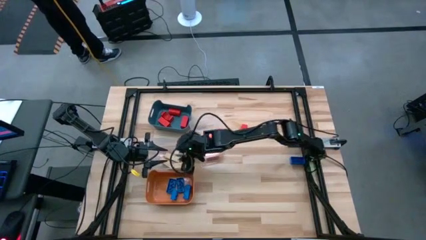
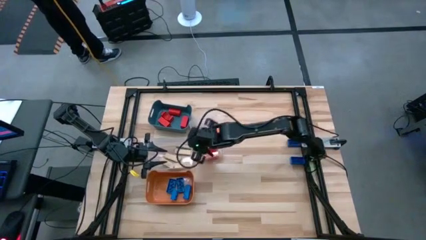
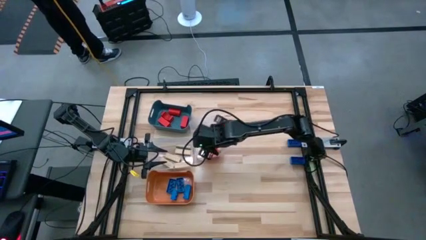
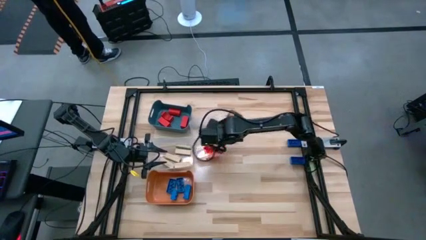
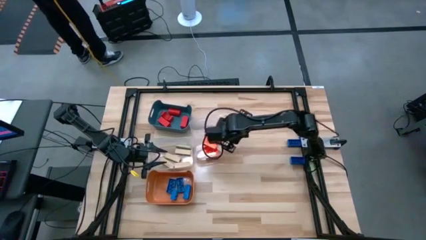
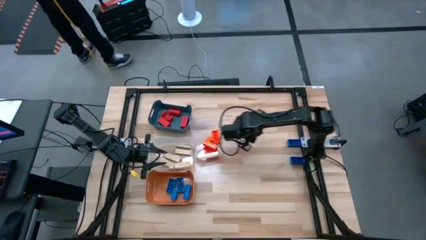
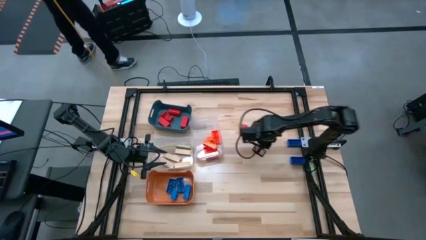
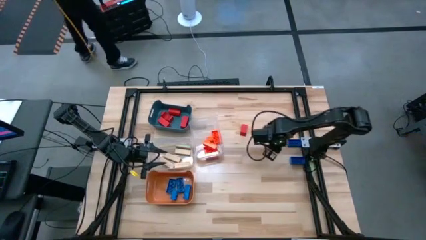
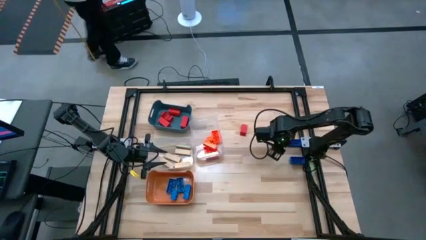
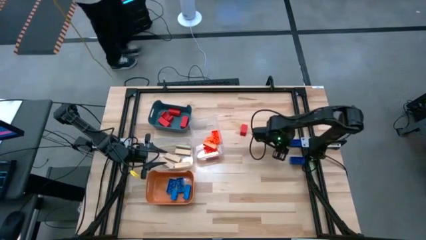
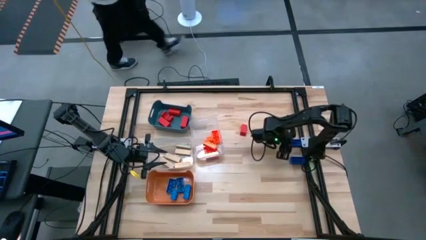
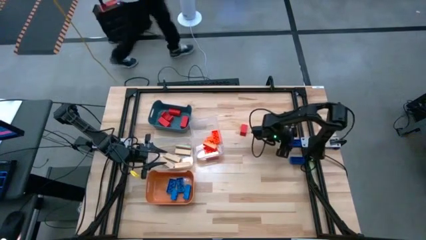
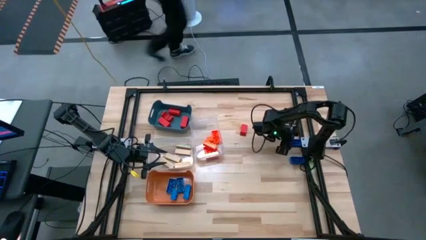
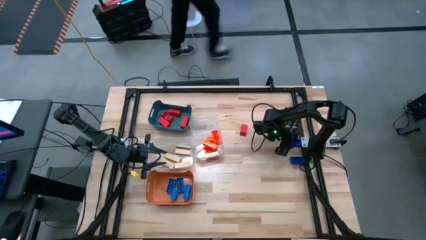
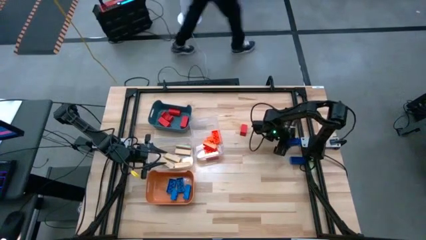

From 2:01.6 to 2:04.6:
Task: Sort blocks
Put the blue game piece into the orange bin

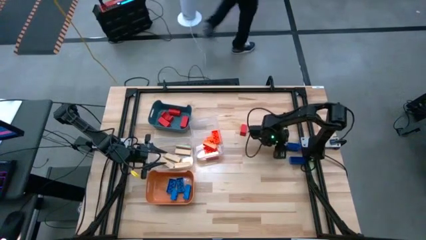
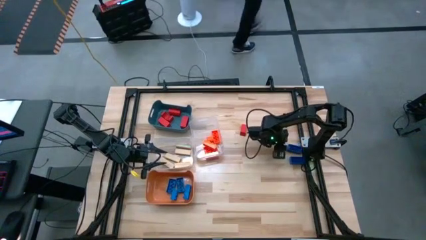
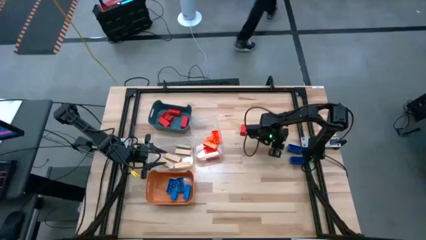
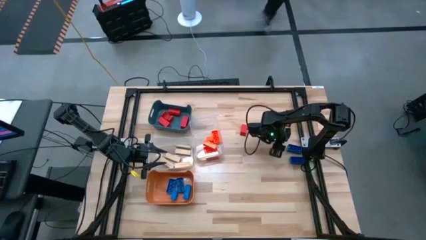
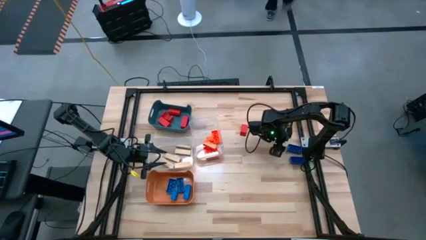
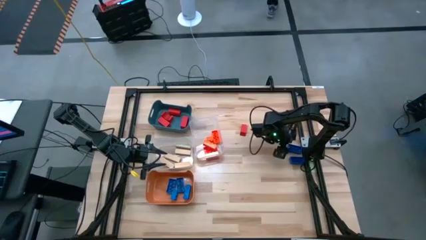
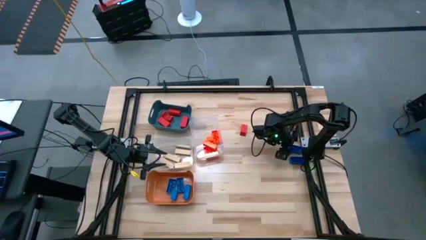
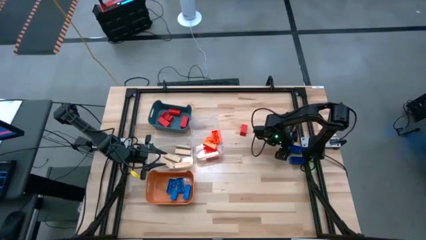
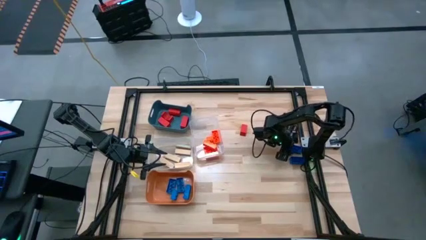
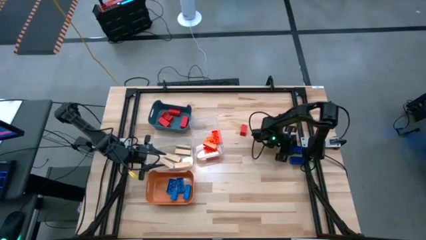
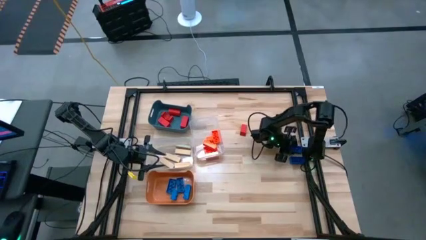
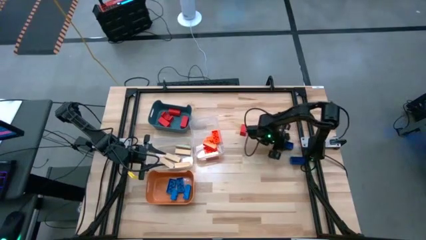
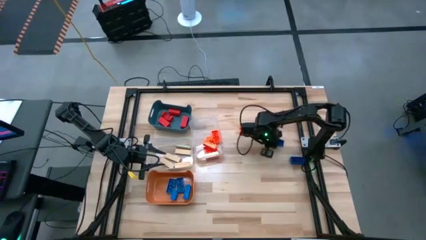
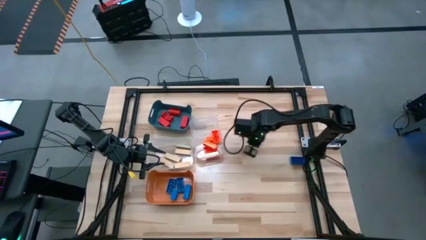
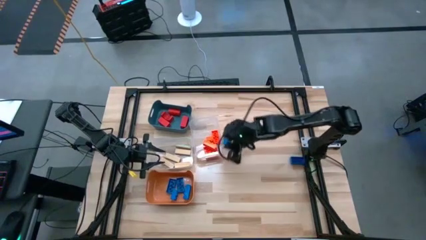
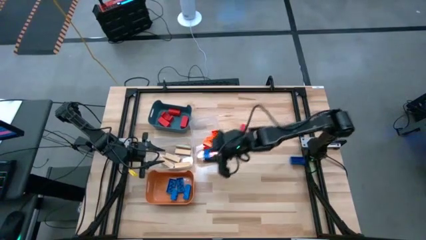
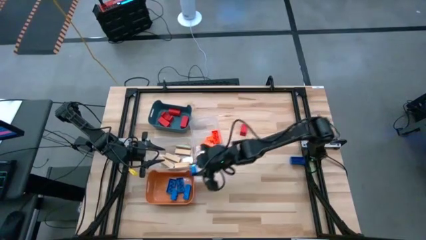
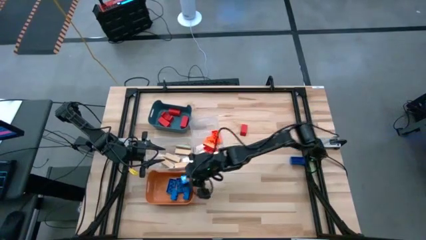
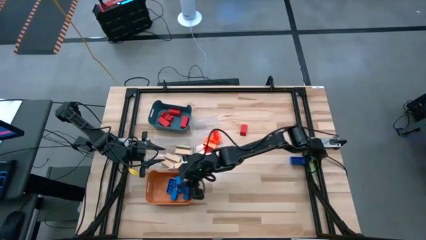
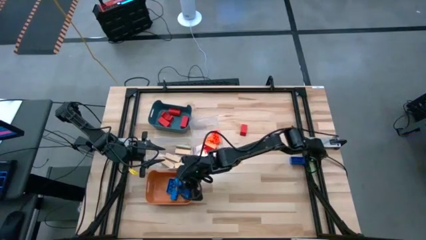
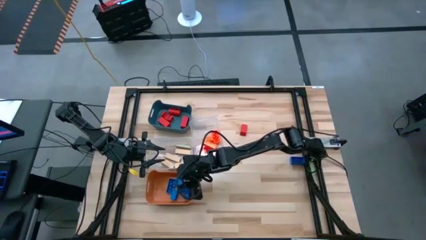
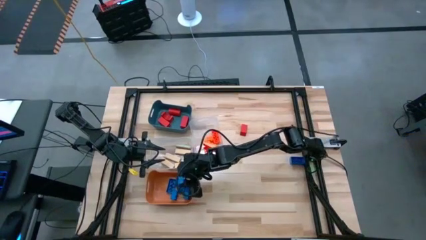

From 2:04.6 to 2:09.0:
Put the blue game piece into the orange bin

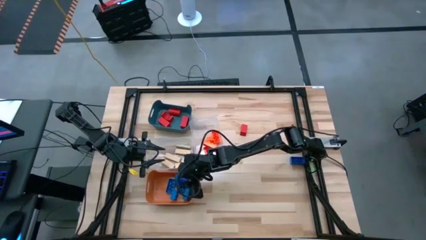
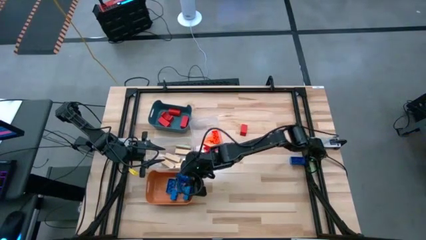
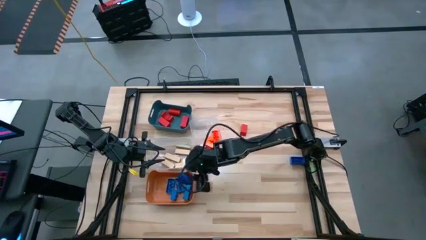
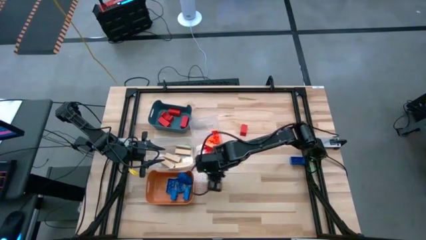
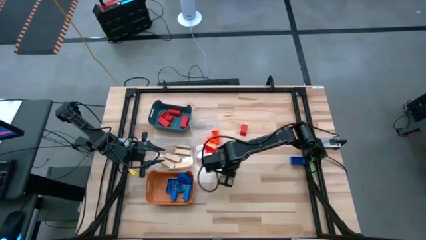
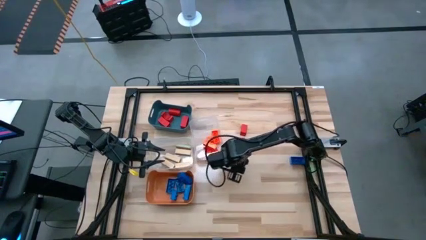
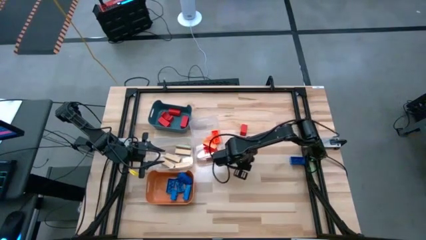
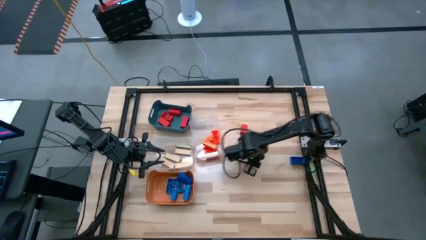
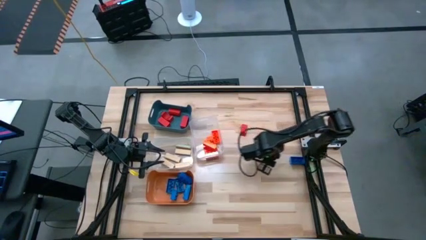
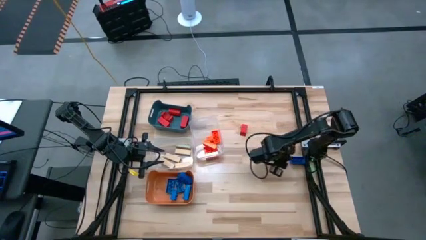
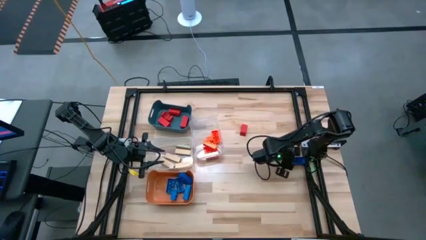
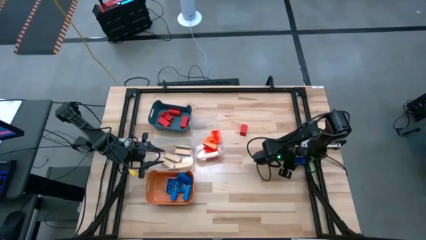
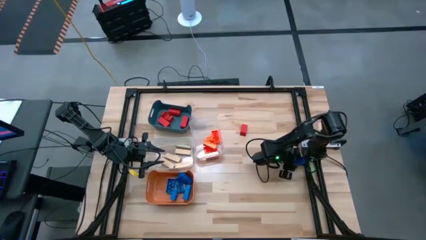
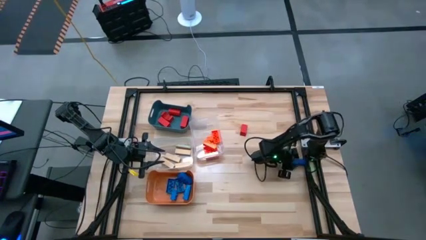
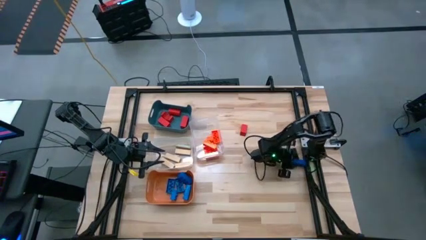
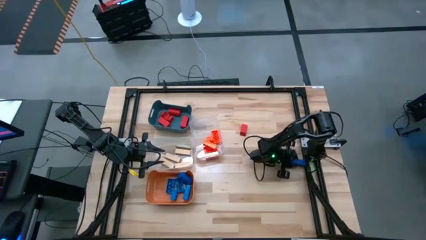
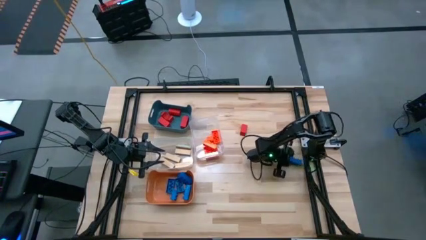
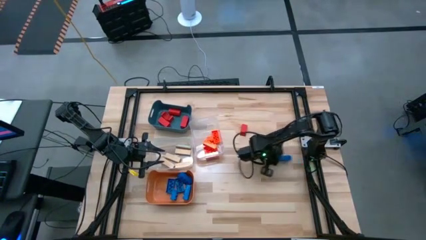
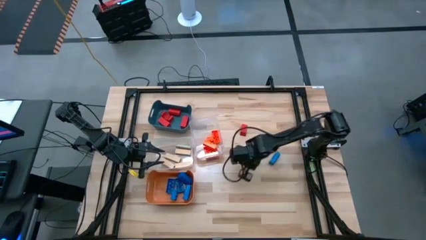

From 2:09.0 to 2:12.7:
Put the blue game piece into the orange bin

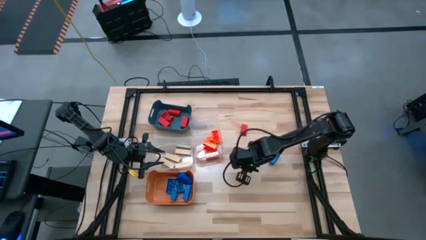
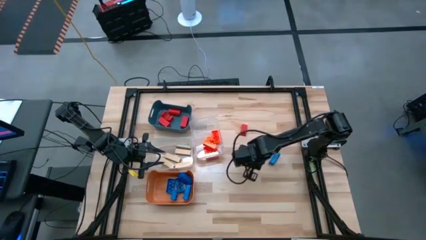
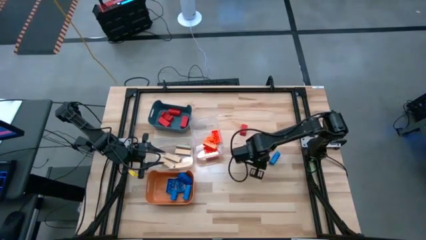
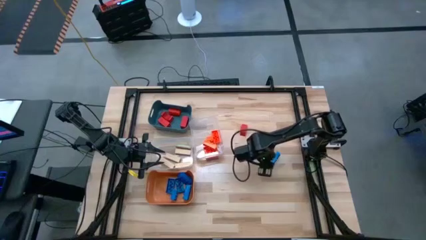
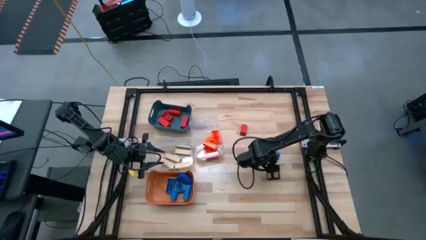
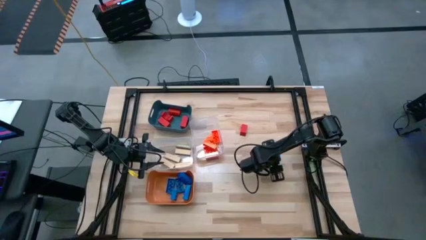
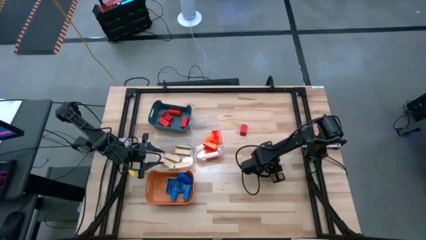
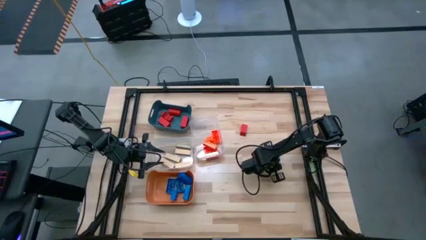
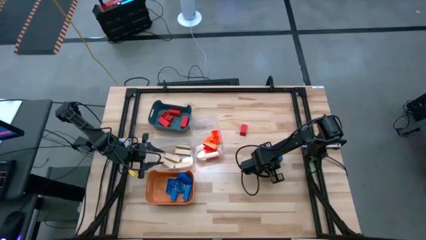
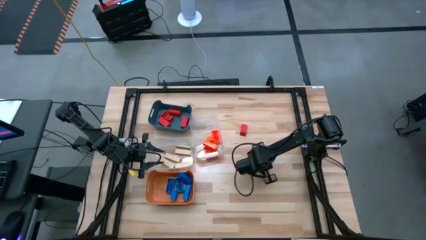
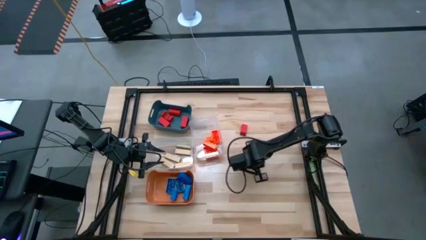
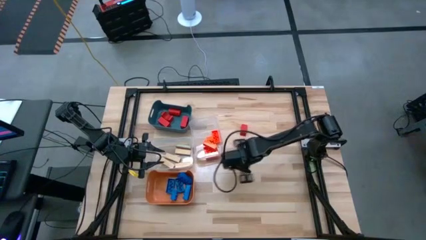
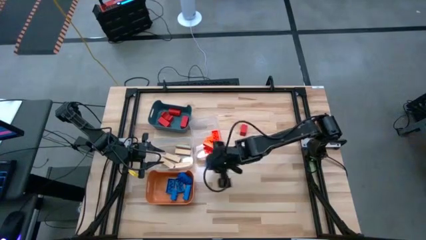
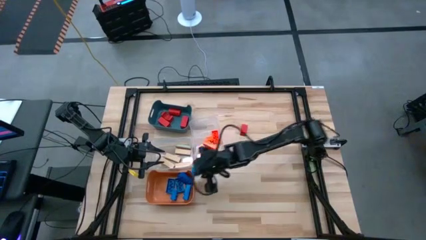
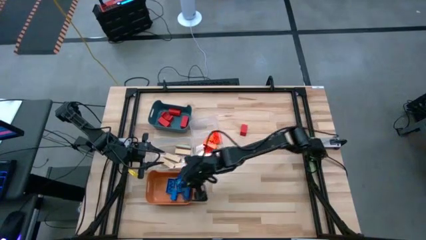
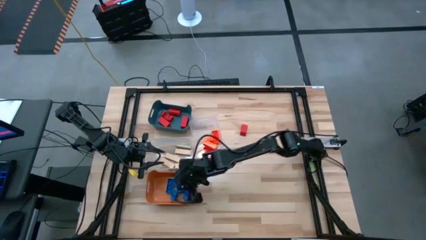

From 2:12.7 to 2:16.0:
Put the blue game piece into the orange bin

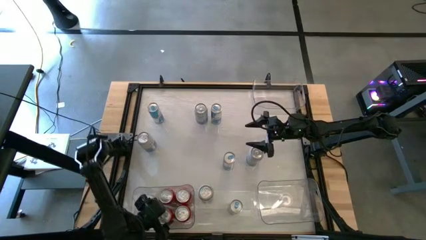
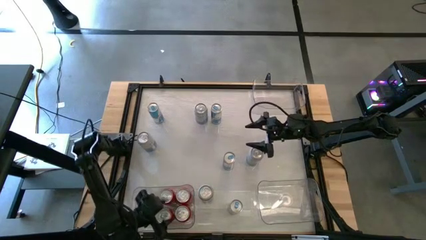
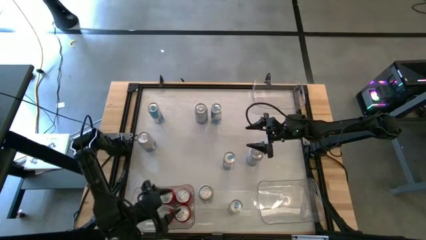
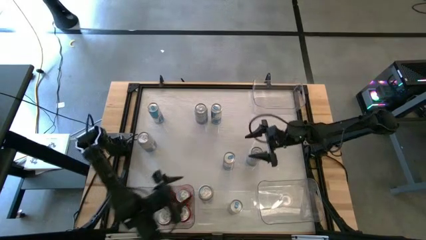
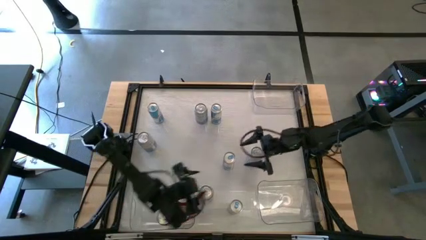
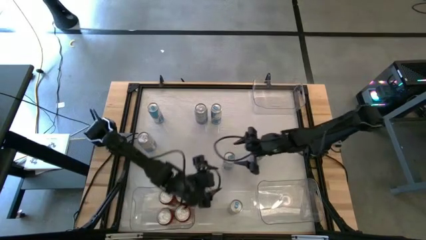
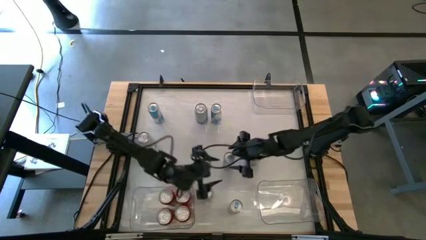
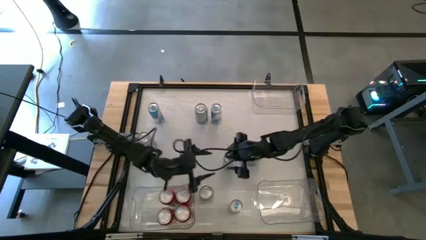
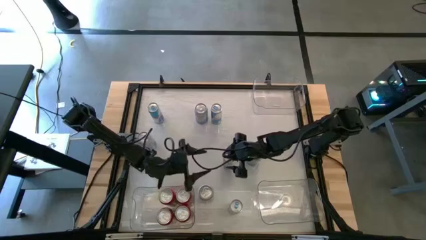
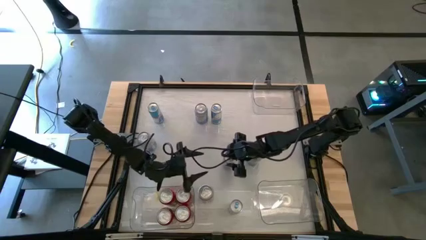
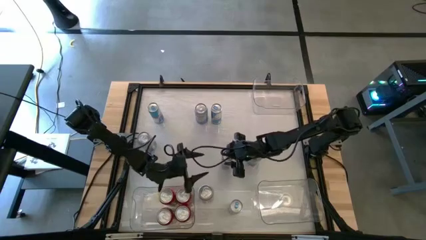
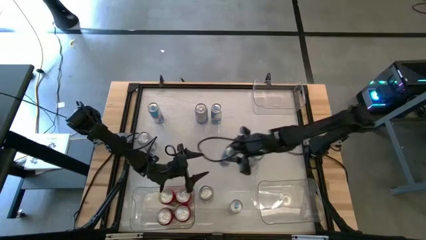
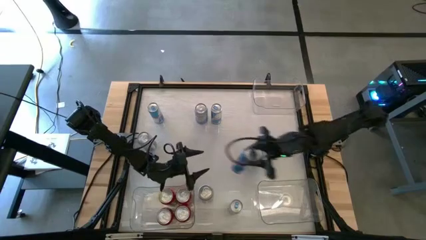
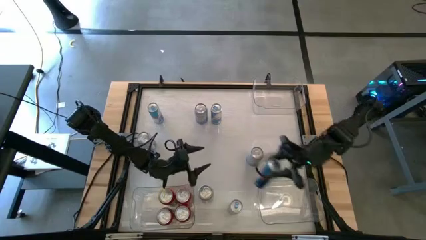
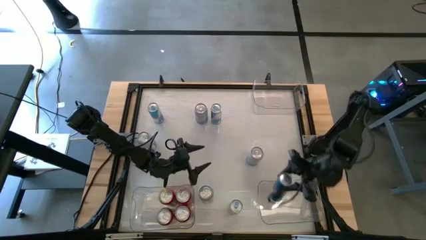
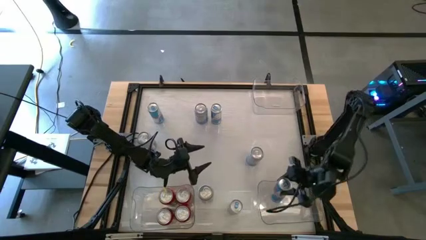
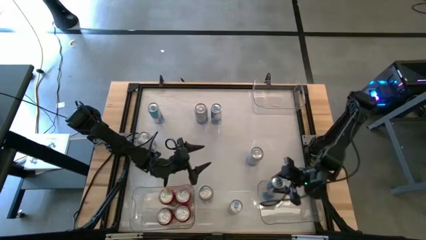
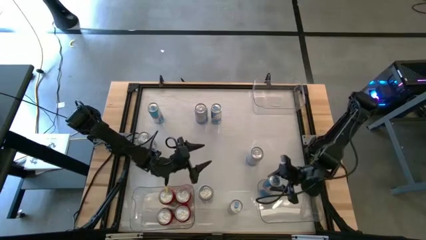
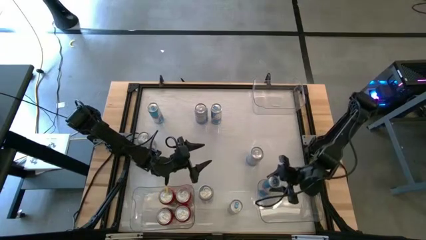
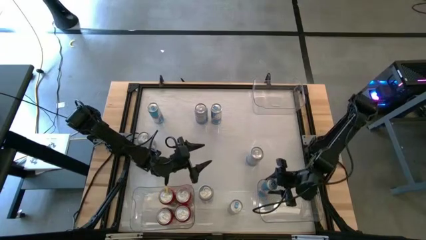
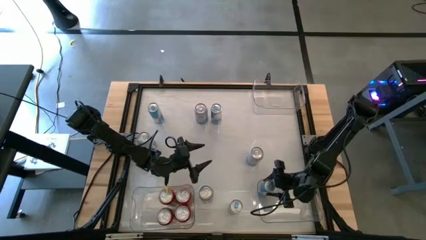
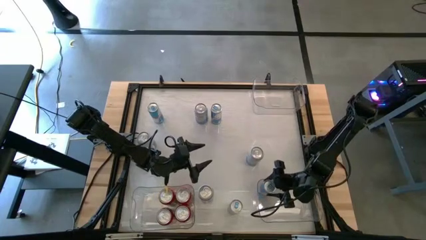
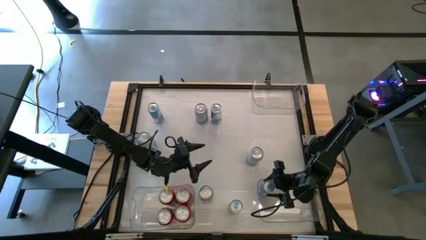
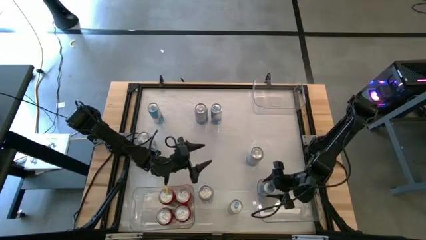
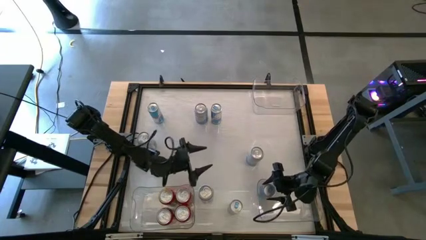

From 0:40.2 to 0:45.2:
Task: Sort soda cans
Put the middle right blue soda can into the bottom right transparent bin
